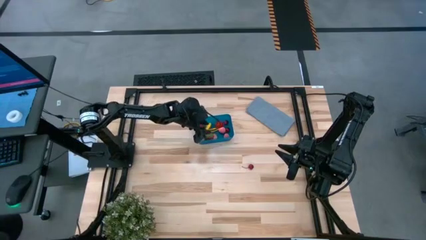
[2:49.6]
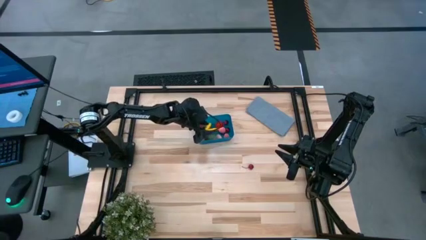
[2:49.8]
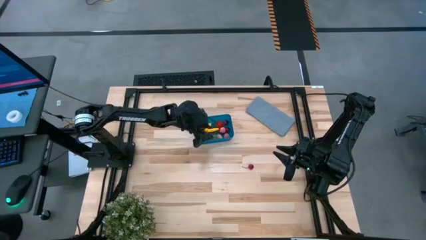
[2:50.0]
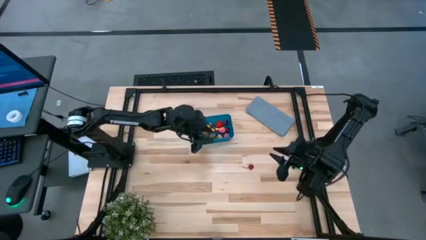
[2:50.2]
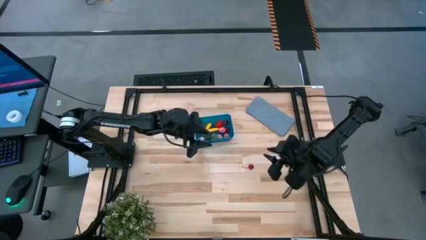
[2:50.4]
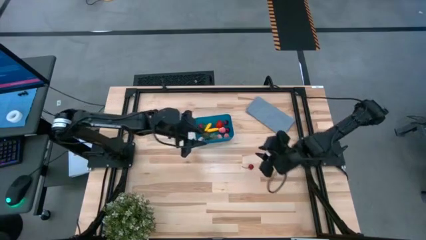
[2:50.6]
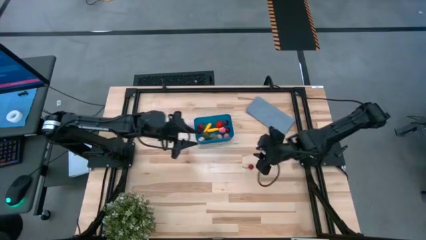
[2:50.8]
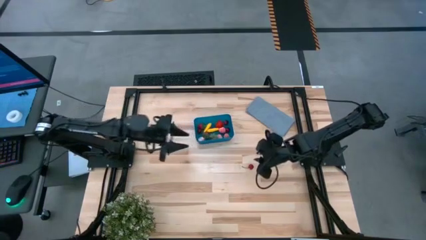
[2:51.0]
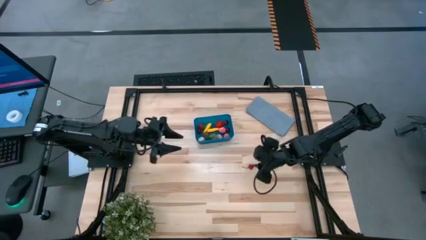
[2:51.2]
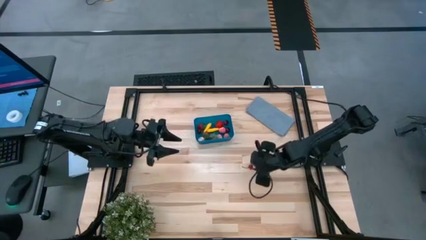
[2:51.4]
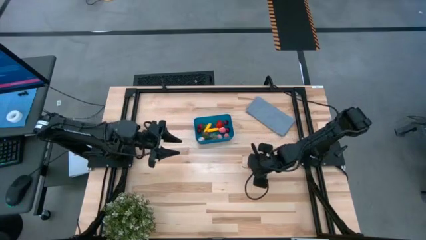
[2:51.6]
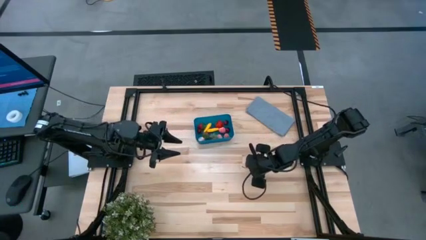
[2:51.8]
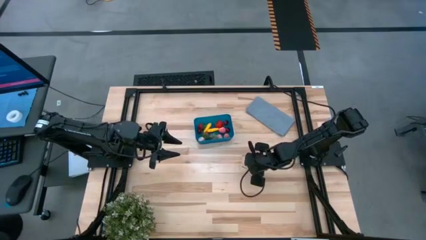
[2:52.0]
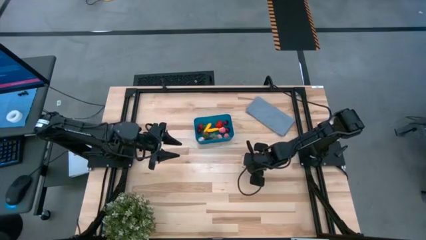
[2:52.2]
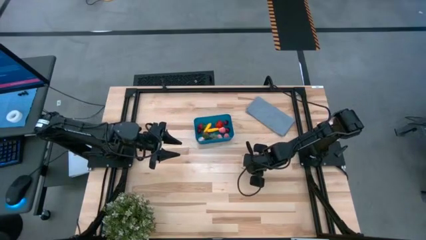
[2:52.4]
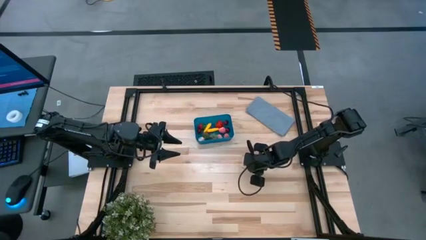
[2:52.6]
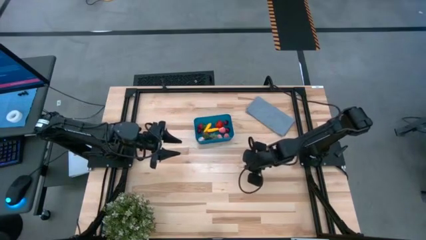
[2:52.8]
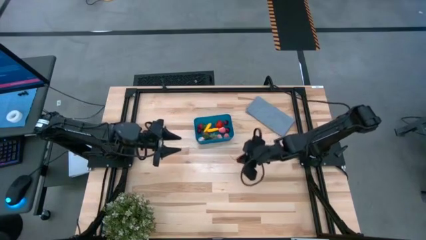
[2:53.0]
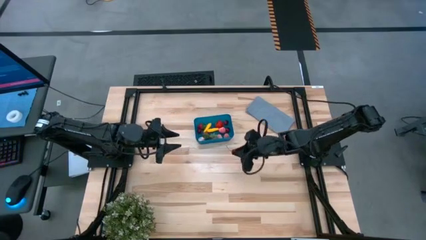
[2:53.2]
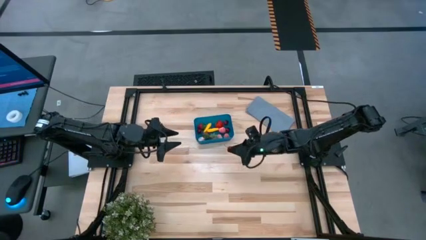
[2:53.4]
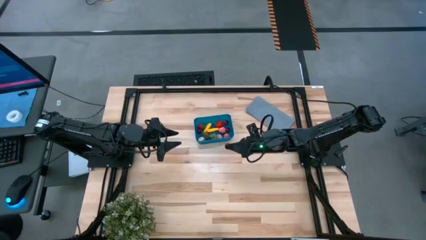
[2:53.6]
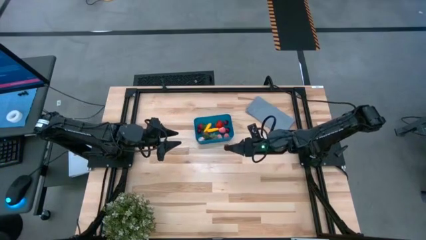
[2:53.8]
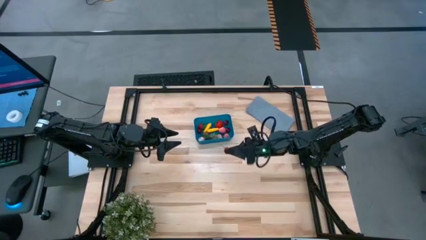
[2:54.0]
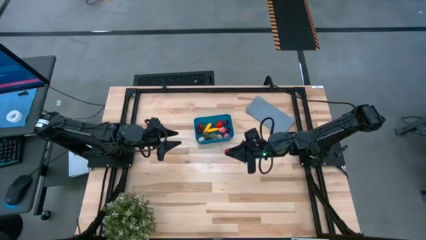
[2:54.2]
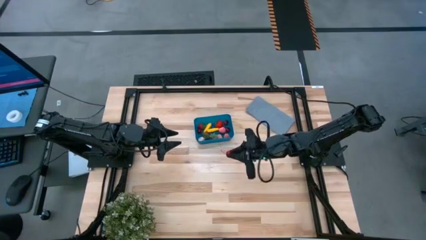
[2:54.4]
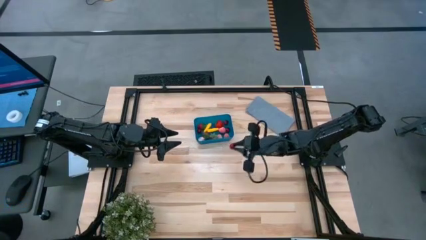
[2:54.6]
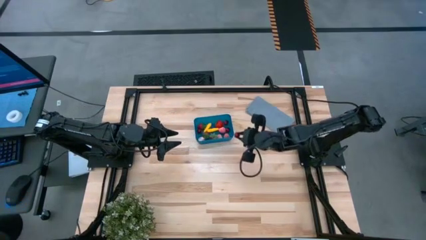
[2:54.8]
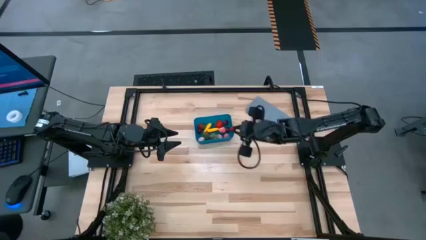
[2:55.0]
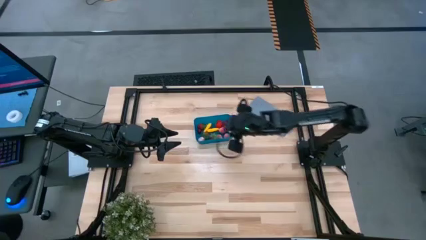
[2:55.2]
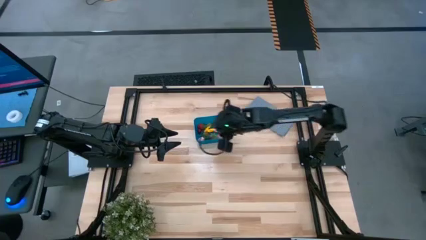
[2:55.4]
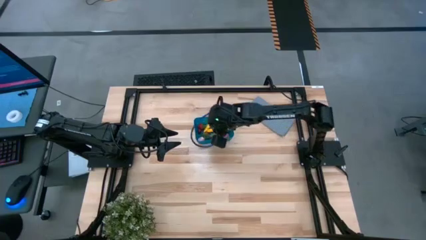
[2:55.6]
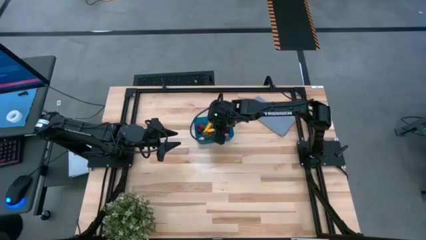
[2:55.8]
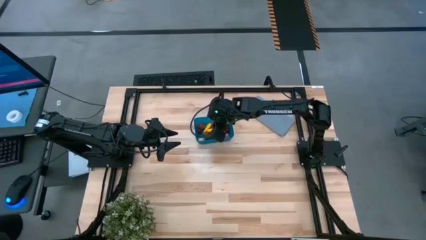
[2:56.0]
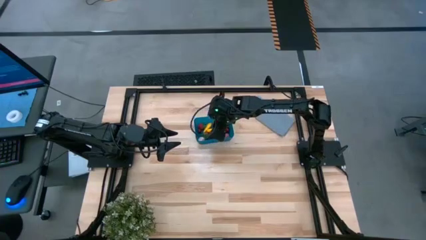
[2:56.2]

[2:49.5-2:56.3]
Task: Pick and placing Produce into tupperware
Put the red cherry into the blue bin

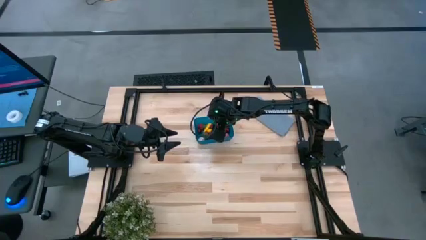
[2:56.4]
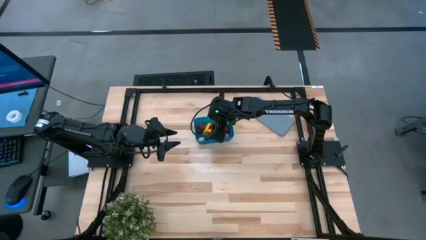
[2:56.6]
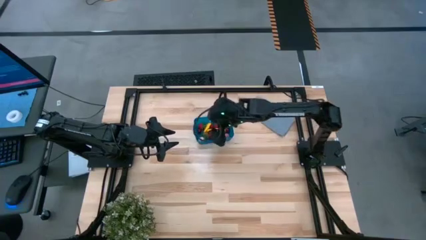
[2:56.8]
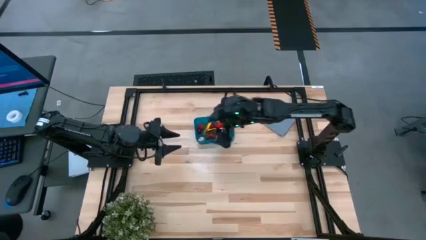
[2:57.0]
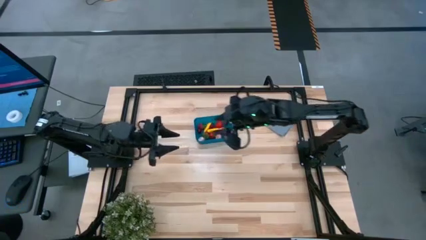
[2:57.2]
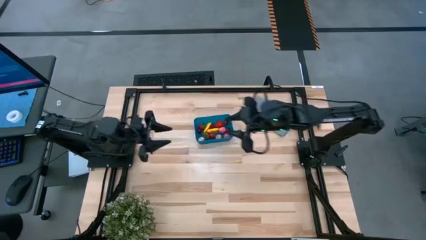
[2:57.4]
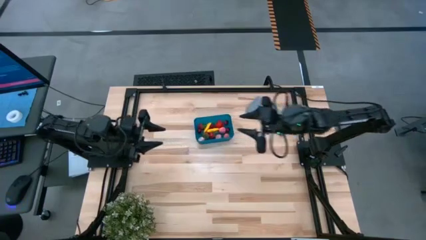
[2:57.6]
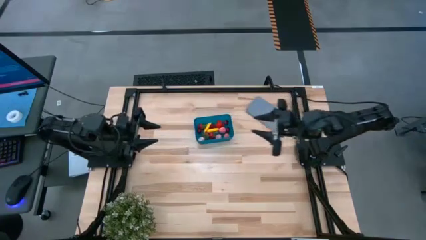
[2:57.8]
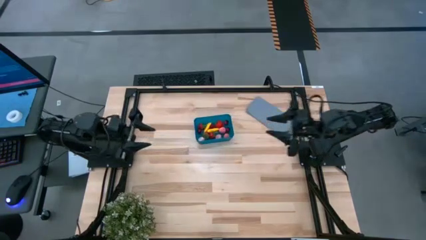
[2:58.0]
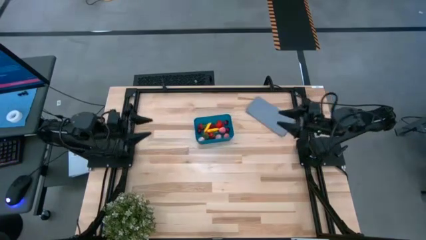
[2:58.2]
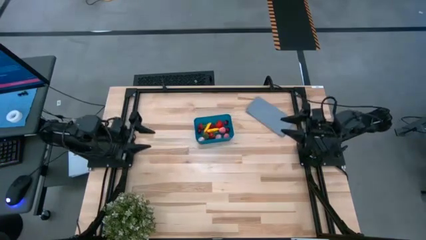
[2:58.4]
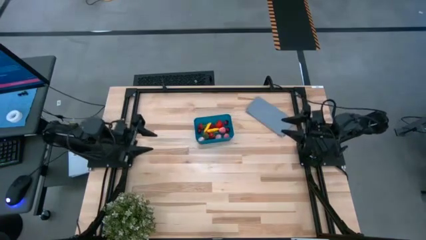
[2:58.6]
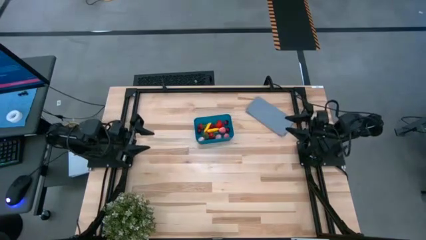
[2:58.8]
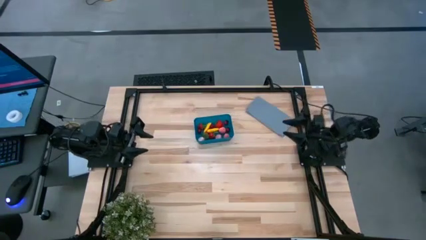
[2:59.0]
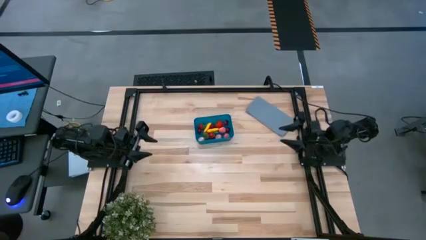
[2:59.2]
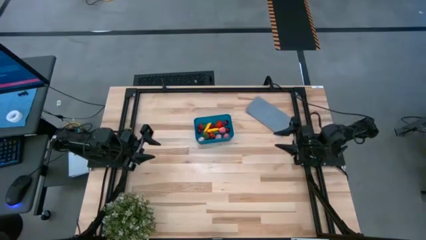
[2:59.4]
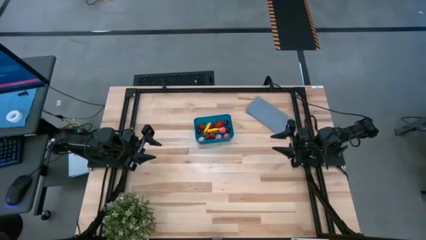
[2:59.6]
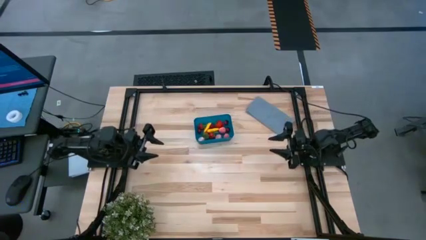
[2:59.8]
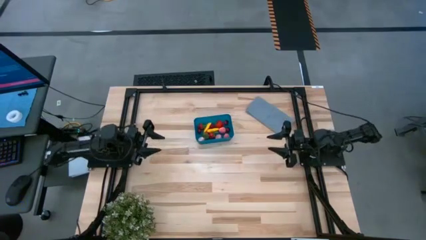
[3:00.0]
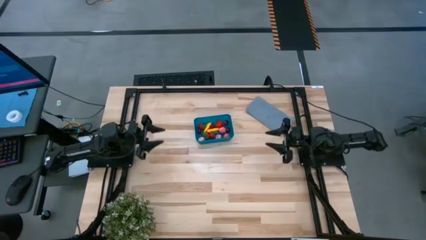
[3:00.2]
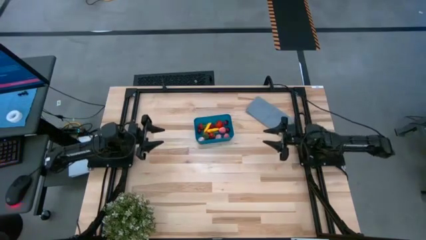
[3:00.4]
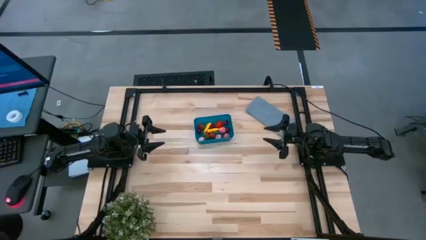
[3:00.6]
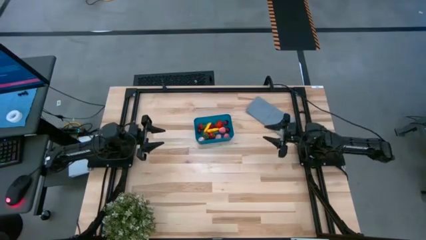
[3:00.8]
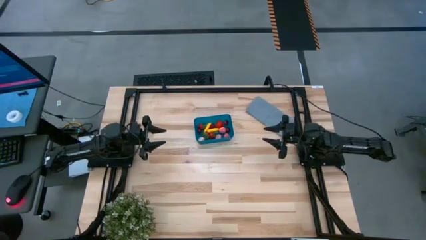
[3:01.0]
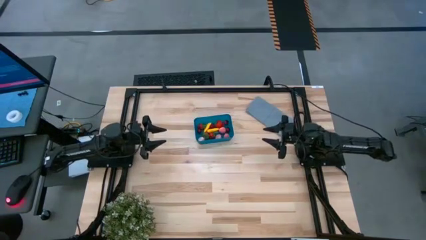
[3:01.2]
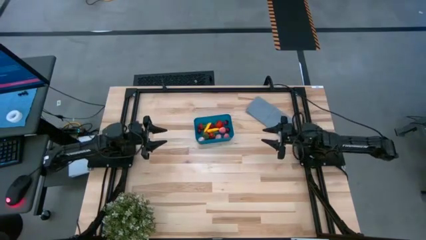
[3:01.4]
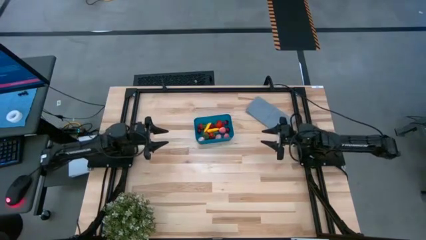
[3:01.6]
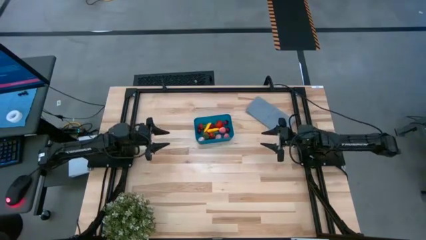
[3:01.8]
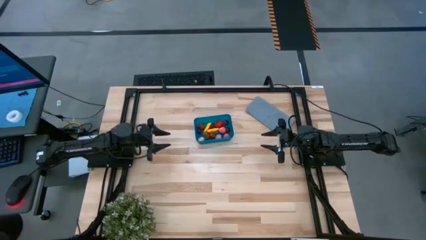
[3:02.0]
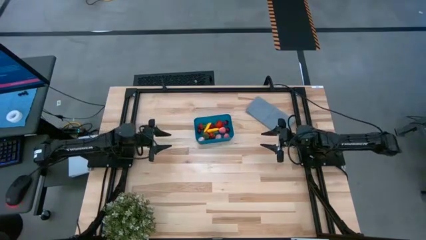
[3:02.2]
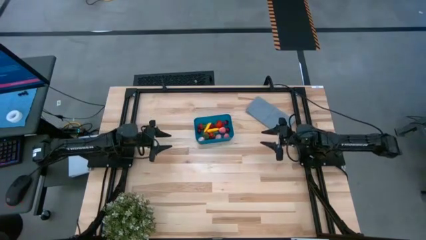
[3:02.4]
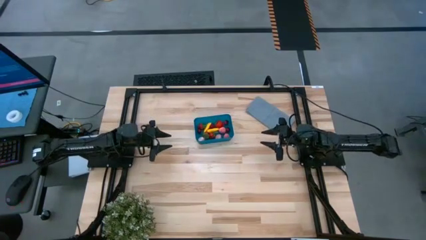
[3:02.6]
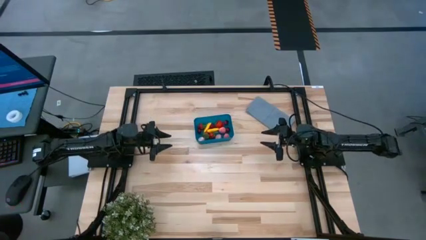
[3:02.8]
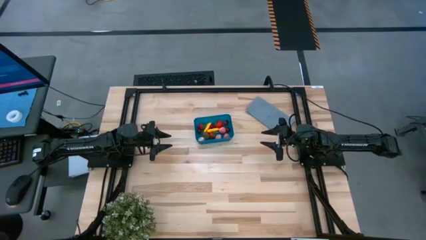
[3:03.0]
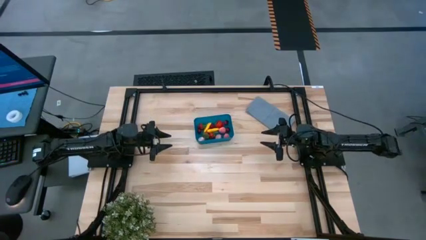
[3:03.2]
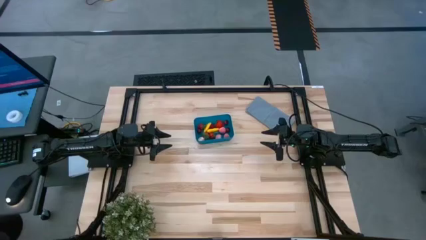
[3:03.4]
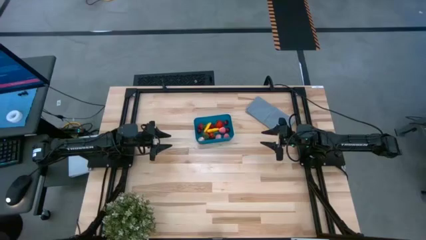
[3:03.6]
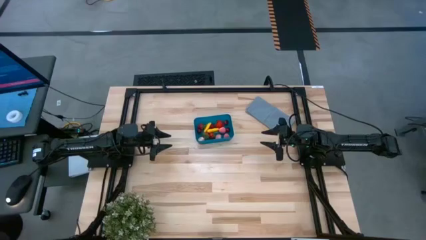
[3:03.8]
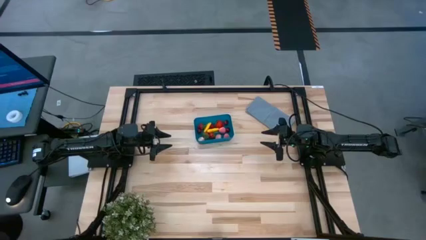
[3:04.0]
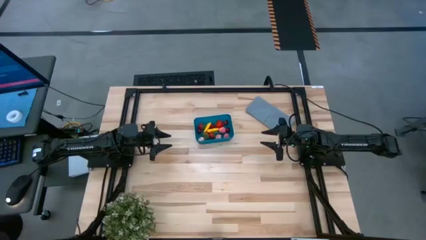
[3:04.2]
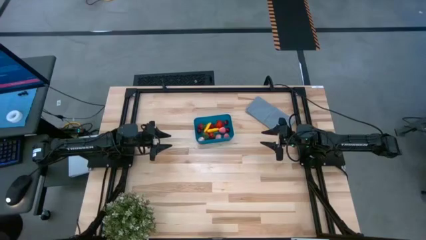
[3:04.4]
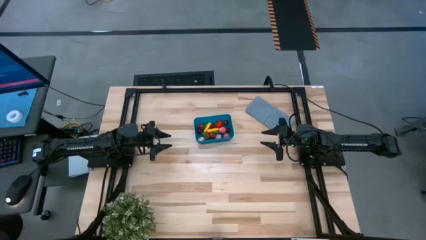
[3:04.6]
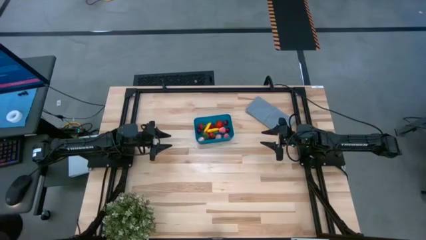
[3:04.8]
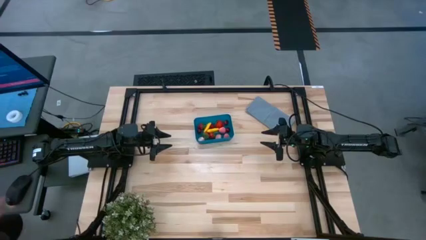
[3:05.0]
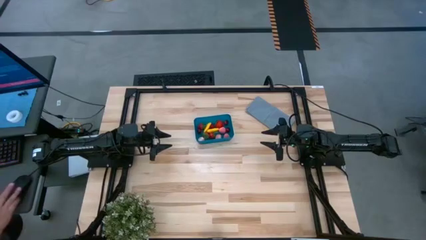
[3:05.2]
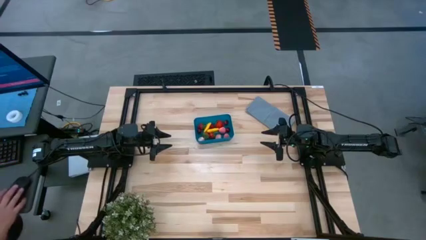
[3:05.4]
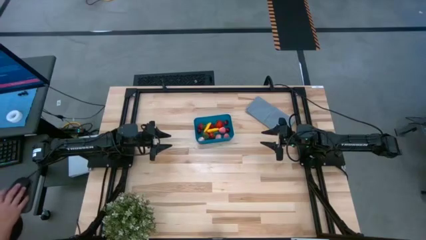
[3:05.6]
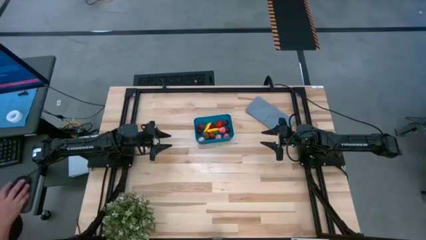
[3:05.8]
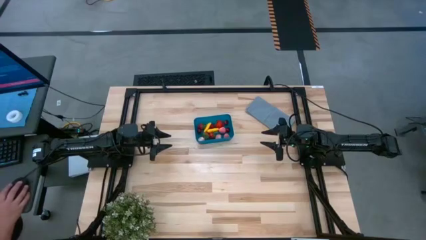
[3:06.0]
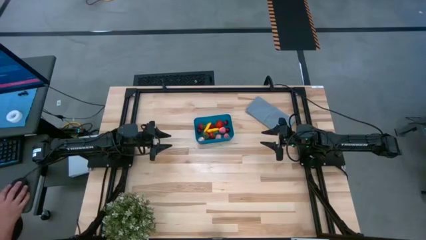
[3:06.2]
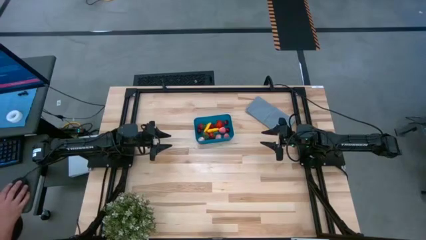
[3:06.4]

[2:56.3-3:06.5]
Return to Home Position
